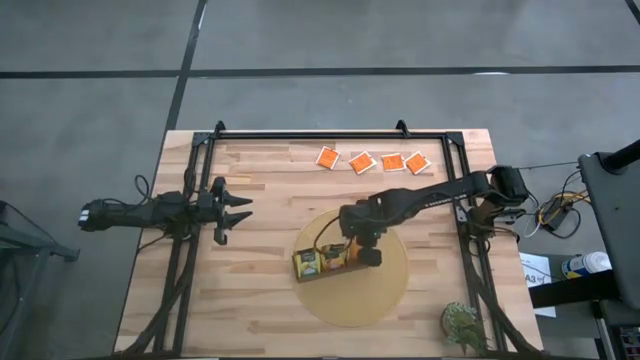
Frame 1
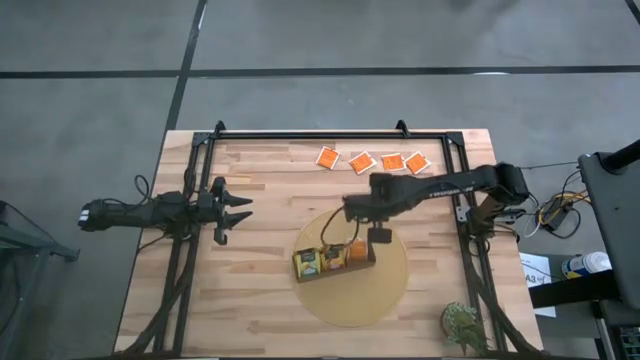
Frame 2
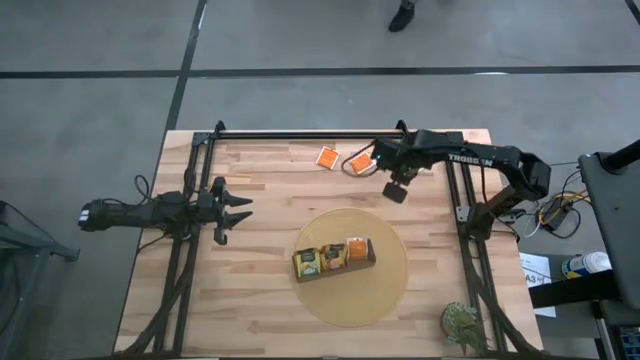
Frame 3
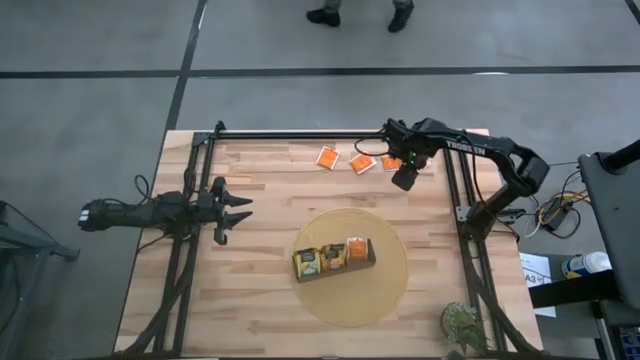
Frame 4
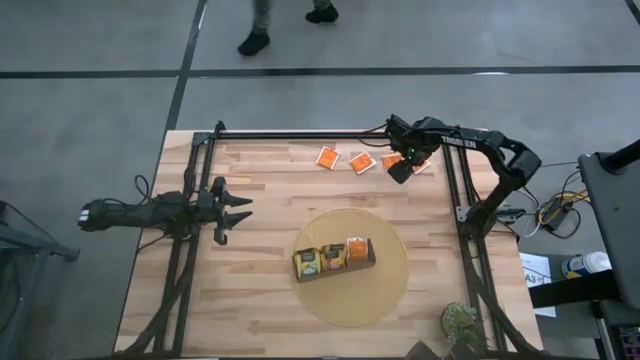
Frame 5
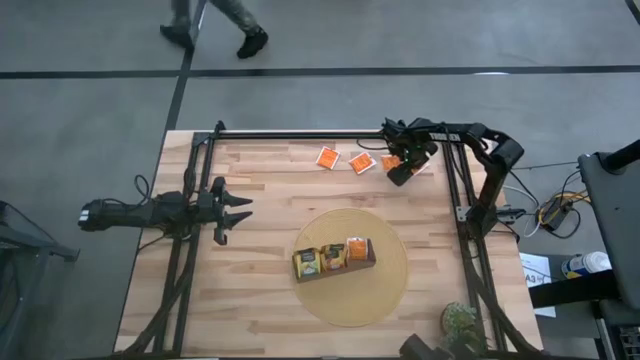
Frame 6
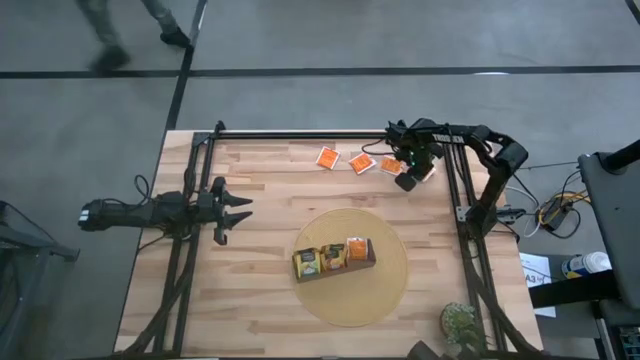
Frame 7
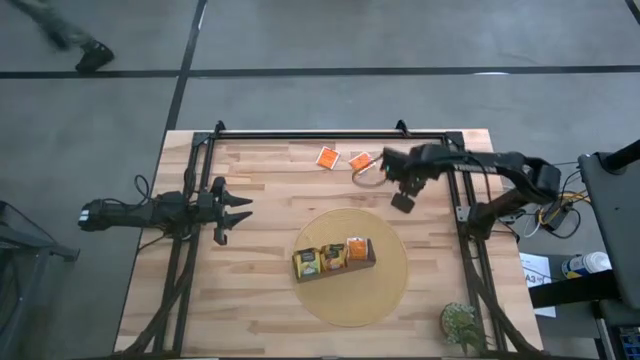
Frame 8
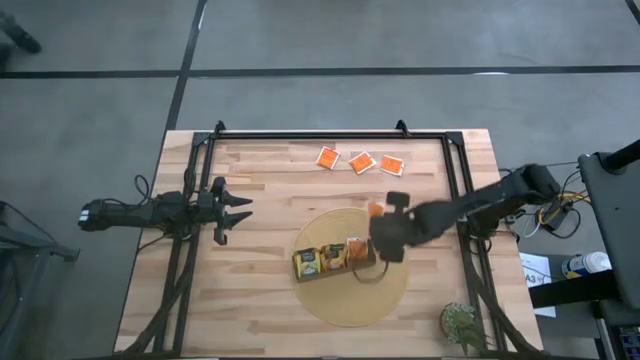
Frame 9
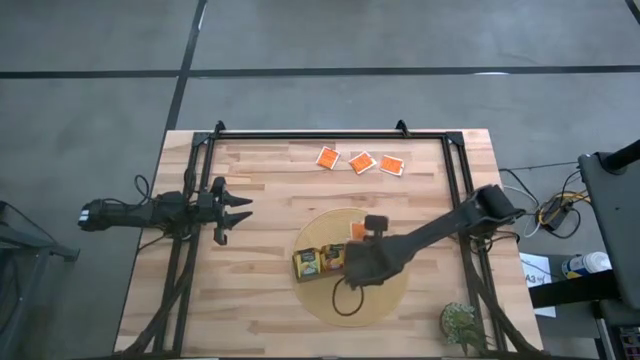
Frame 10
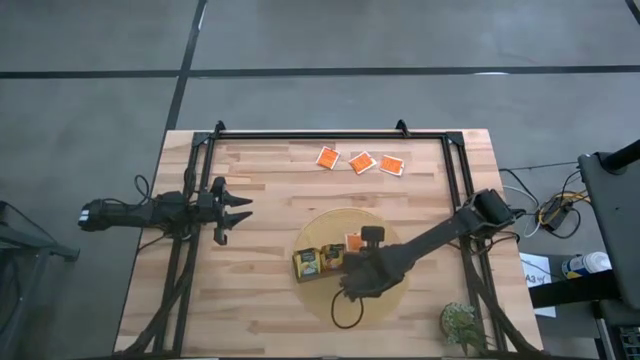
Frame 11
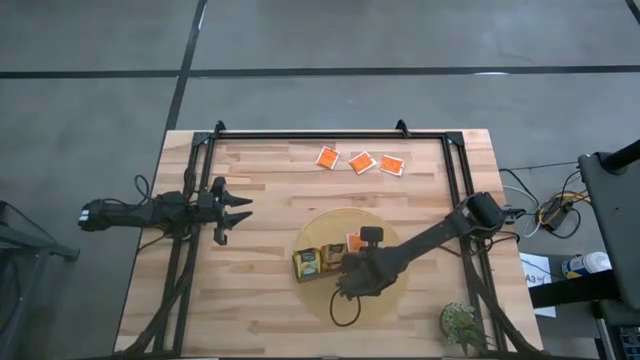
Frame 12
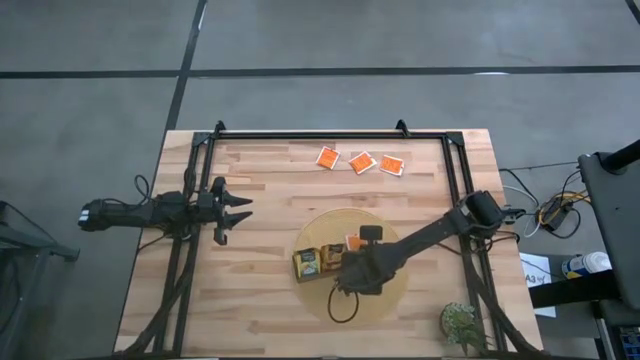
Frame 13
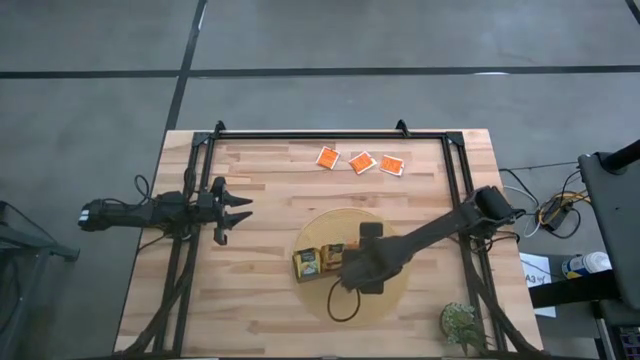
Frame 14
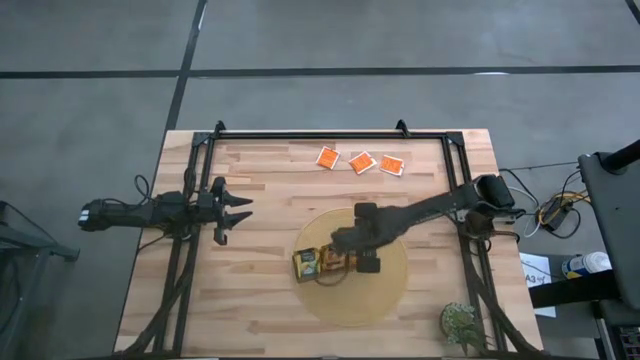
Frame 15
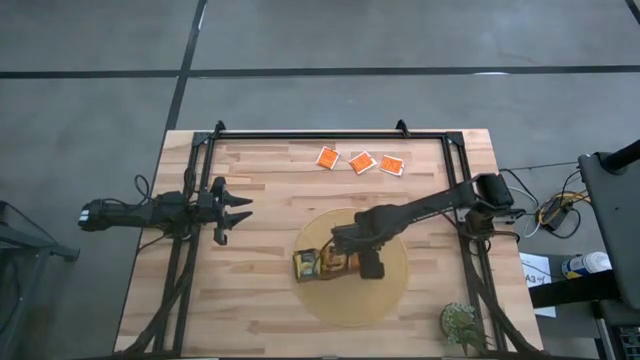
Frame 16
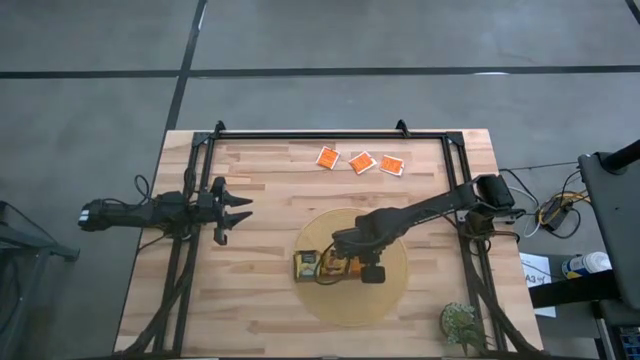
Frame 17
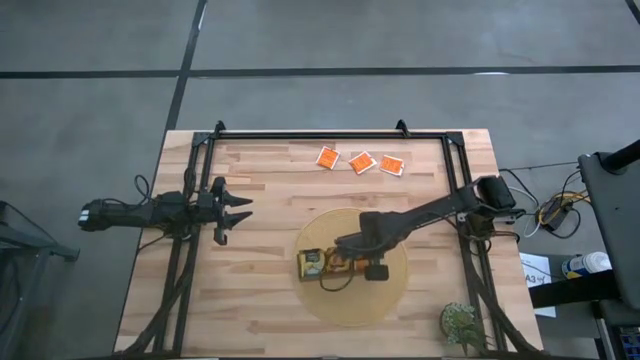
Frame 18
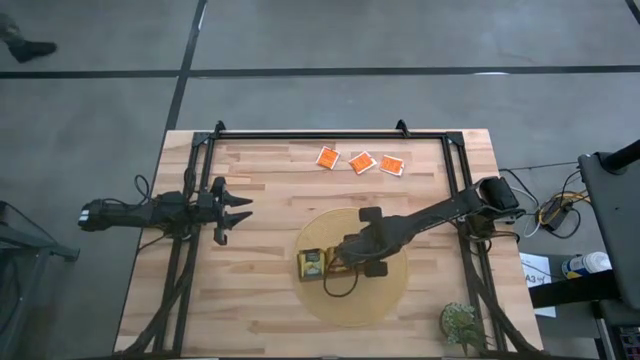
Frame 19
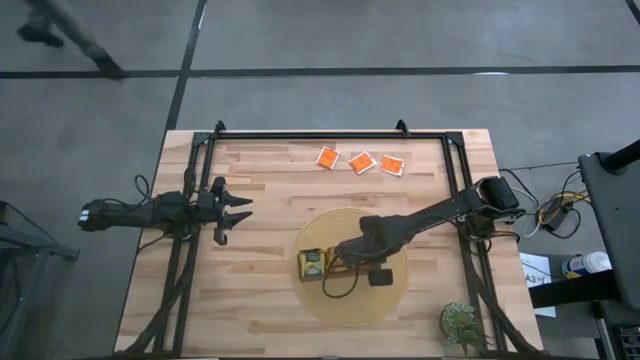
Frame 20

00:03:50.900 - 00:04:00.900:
Task: Pick & Place Tea
Put the orange tea bag into the right section of the wooden organizer

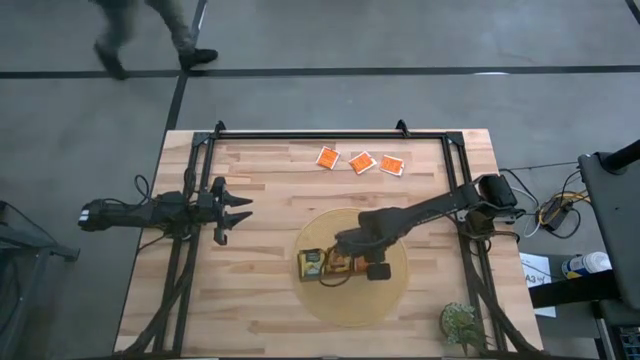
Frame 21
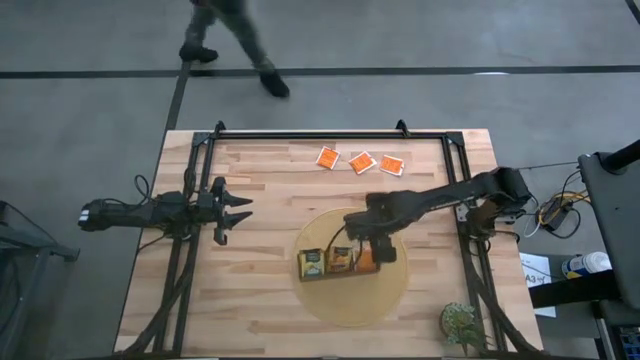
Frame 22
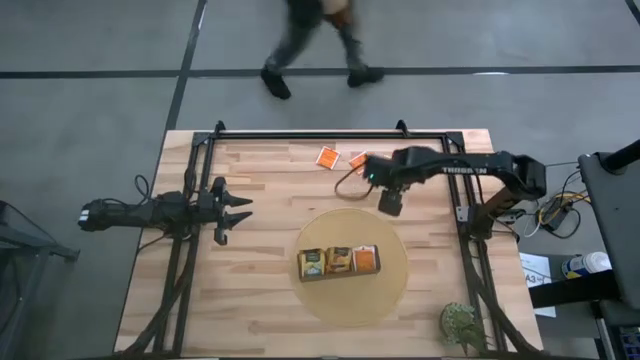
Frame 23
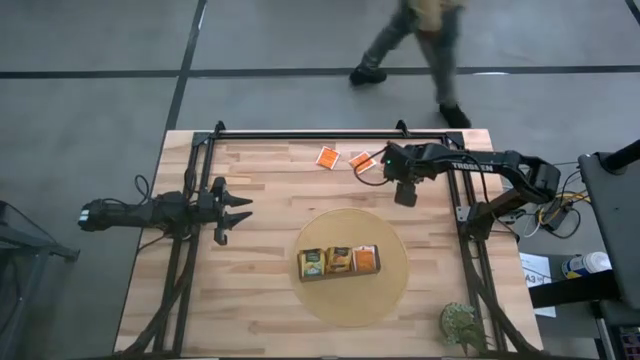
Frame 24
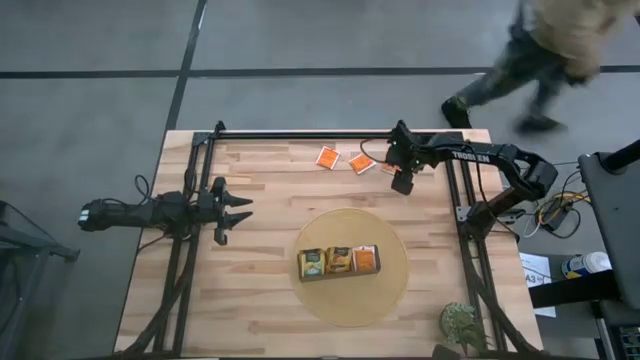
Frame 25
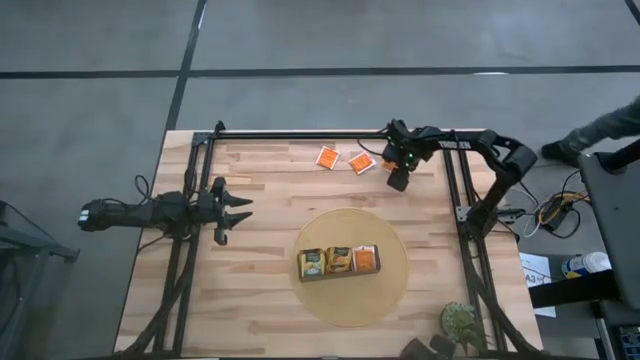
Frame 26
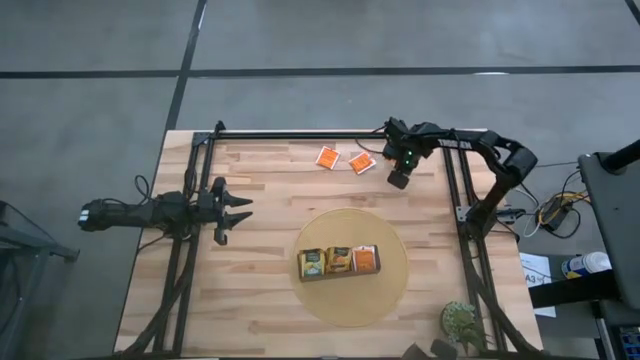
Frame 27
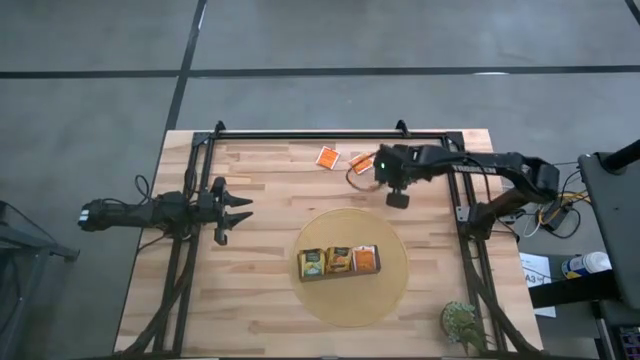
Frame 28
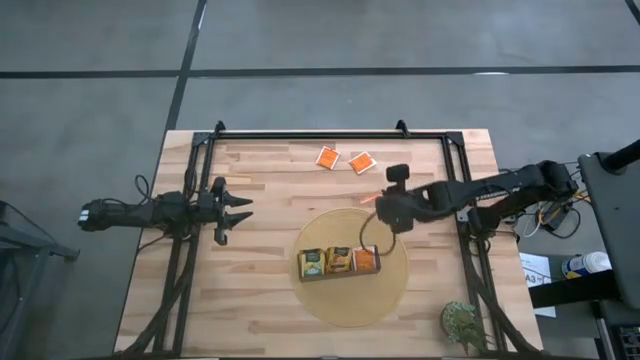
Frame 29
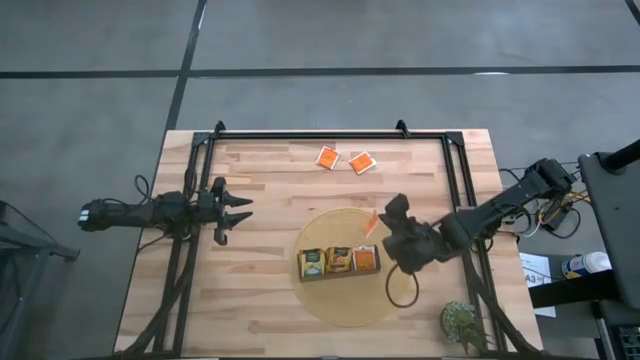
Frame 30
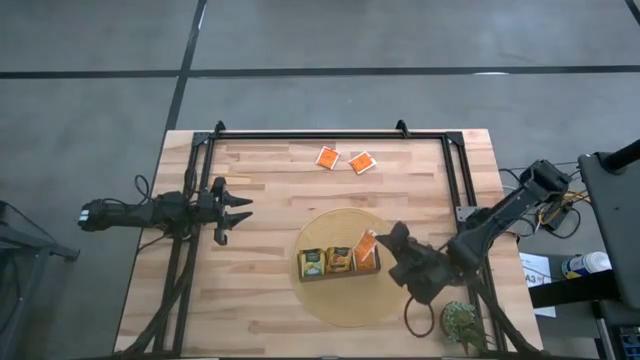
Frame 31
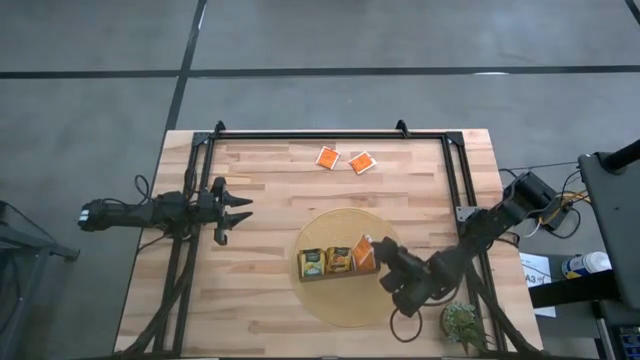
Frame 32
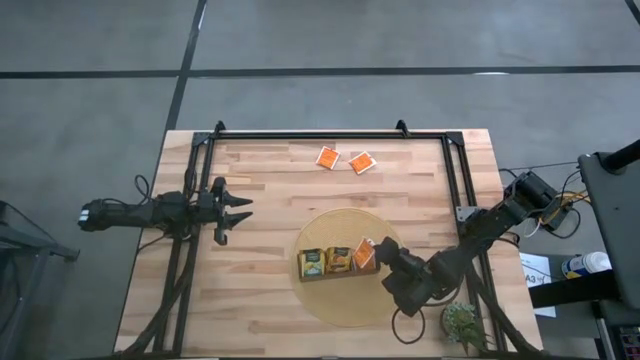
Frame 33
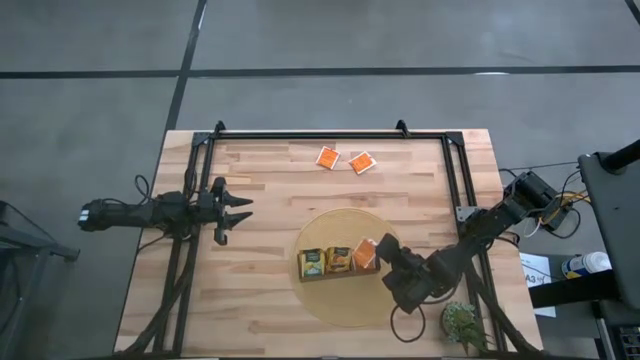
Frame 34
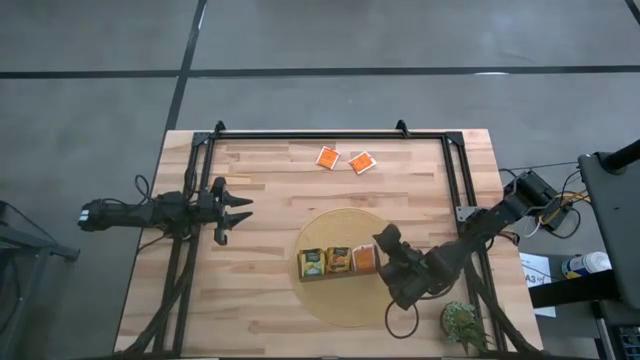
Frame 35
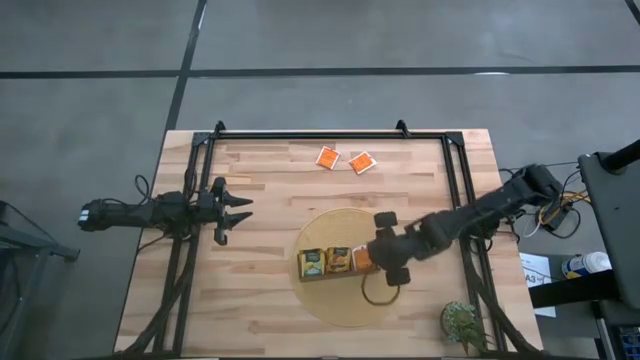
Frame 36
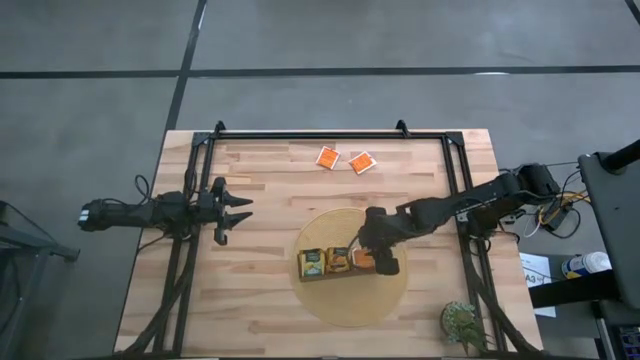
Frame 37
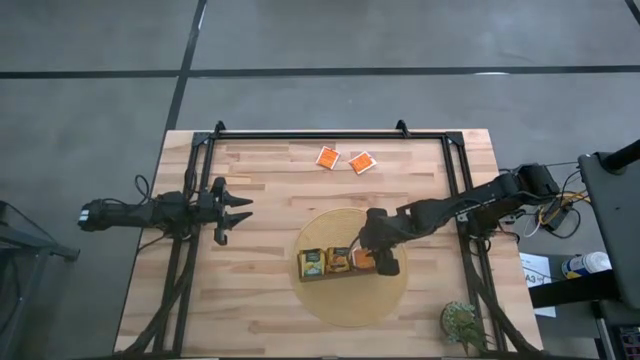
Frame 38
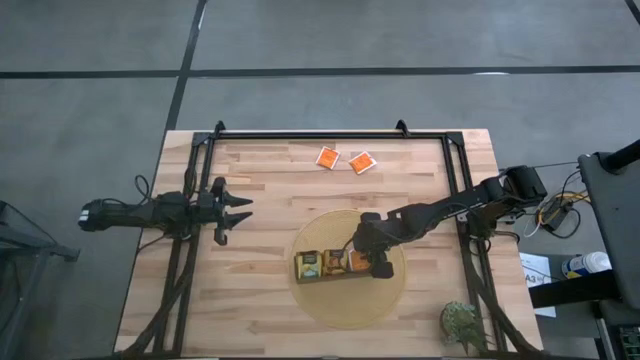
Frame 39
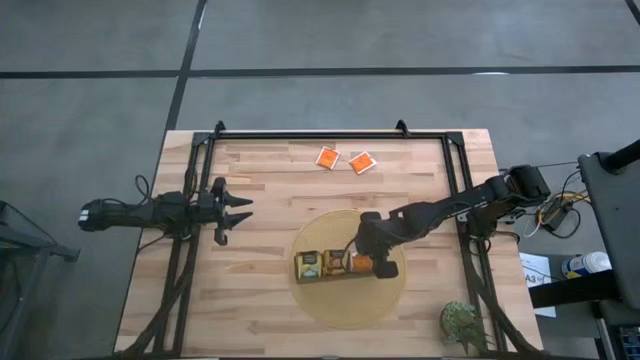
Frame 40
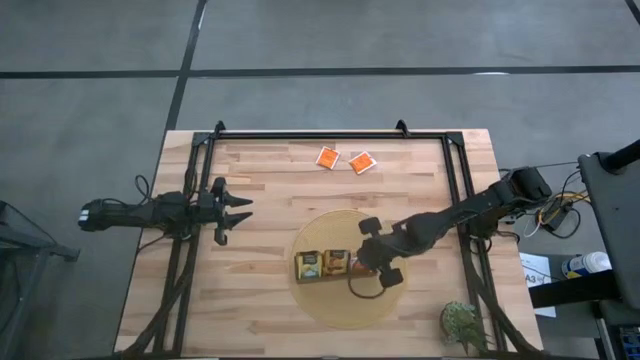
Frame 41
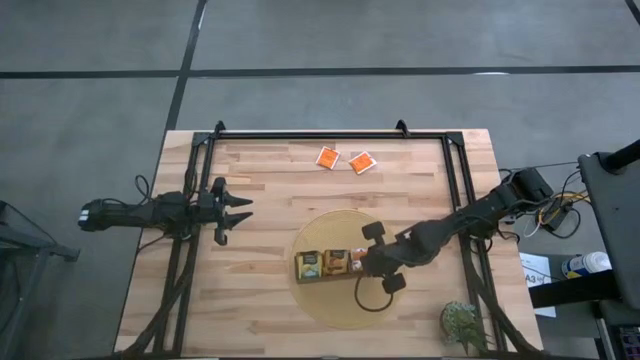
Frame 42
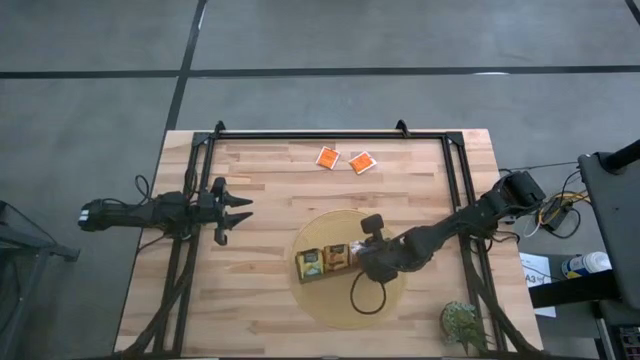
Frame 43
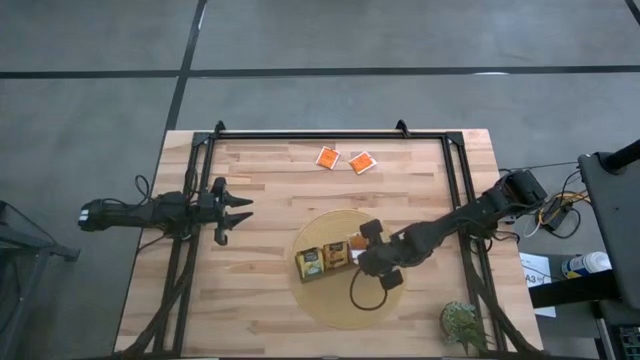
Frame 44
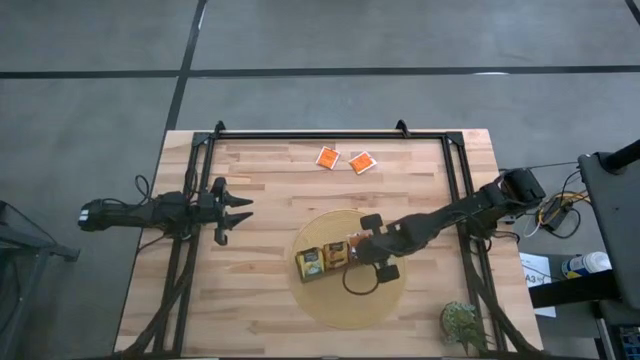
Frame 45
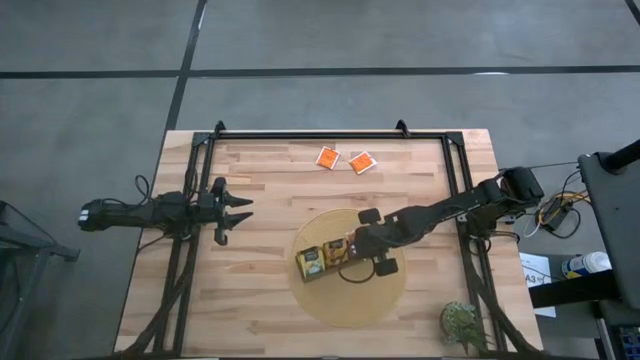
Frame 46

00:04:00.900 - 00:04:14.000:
Put the orange tea bag into the right section of the wooden organizer
